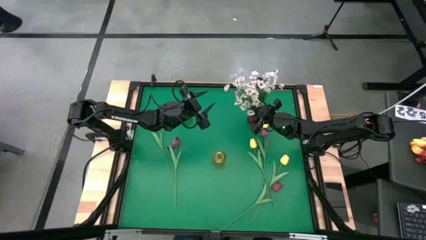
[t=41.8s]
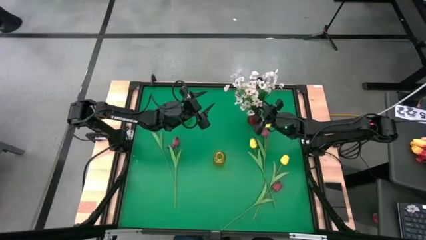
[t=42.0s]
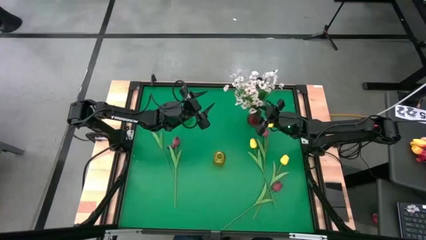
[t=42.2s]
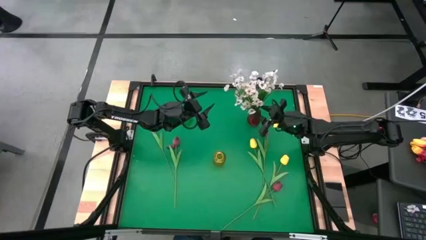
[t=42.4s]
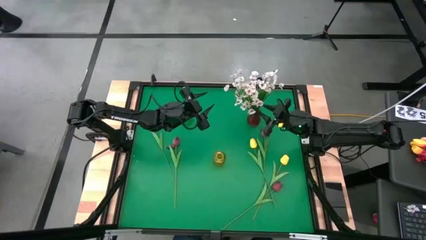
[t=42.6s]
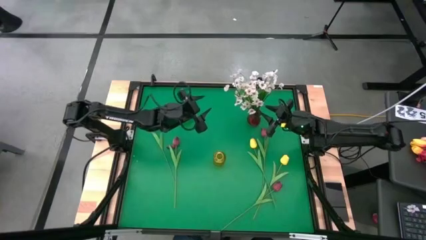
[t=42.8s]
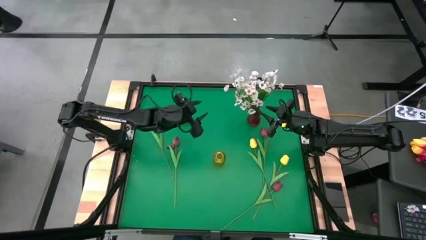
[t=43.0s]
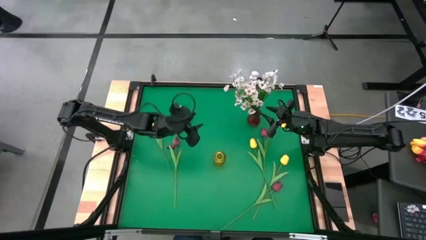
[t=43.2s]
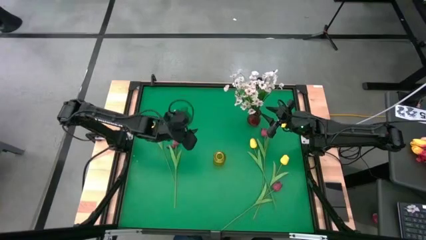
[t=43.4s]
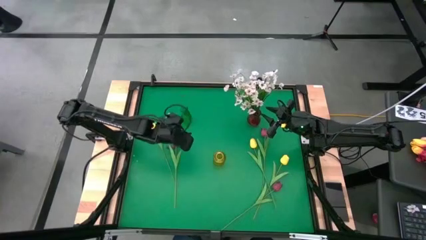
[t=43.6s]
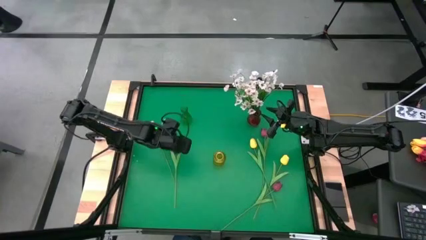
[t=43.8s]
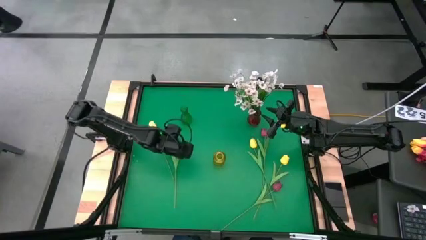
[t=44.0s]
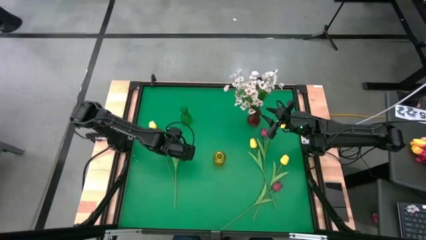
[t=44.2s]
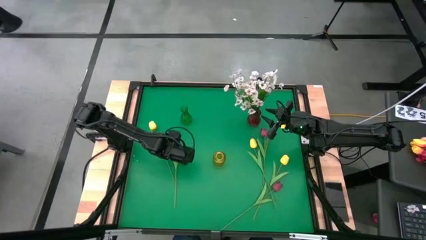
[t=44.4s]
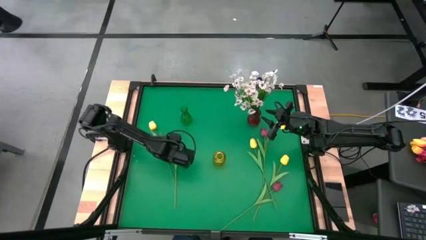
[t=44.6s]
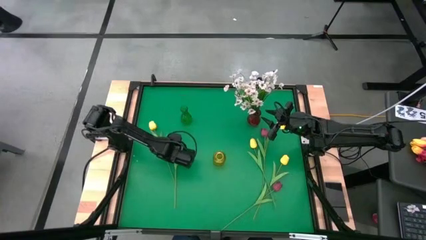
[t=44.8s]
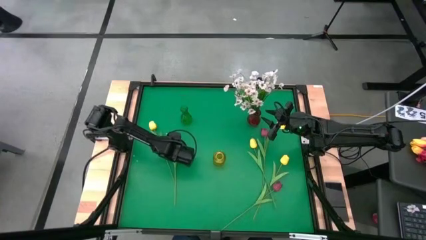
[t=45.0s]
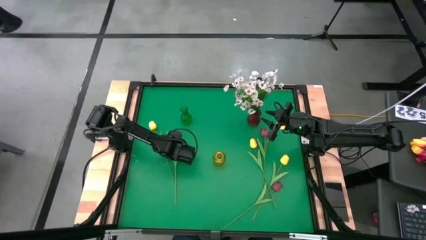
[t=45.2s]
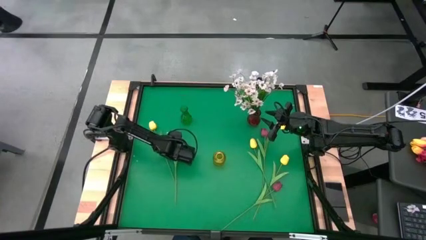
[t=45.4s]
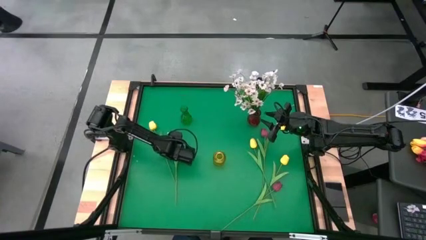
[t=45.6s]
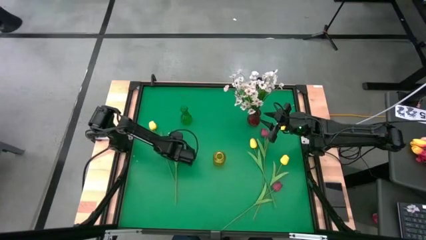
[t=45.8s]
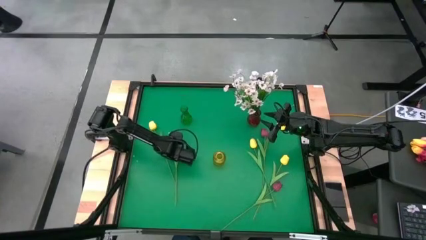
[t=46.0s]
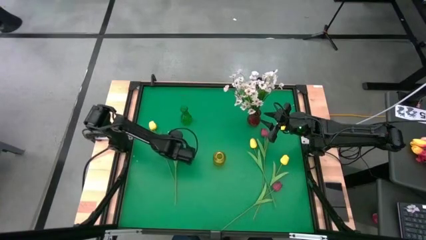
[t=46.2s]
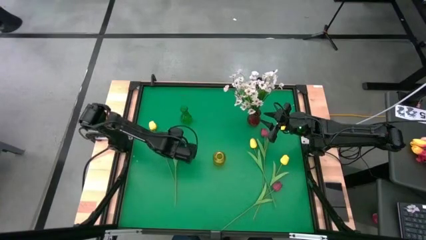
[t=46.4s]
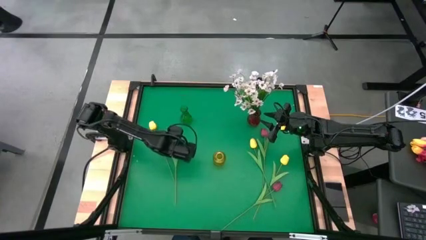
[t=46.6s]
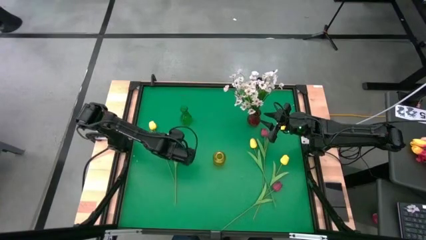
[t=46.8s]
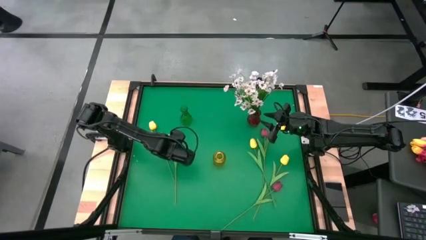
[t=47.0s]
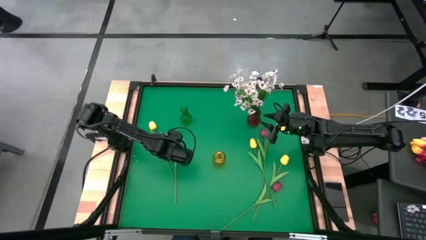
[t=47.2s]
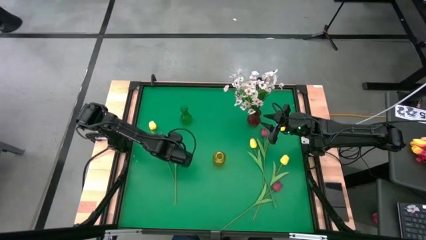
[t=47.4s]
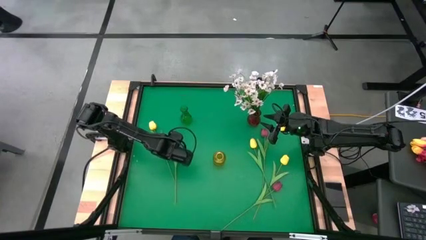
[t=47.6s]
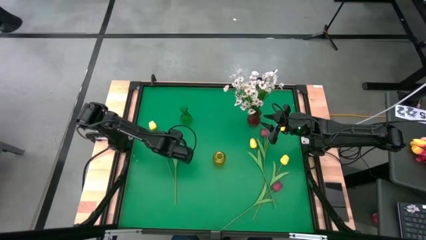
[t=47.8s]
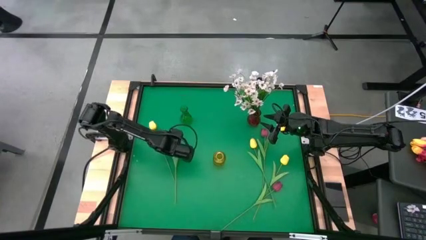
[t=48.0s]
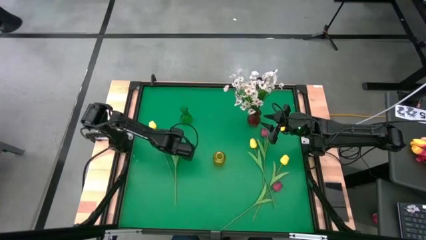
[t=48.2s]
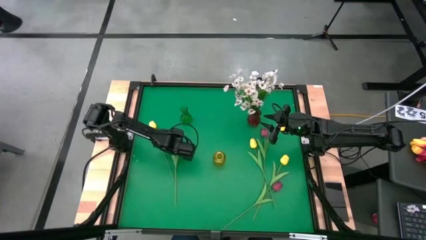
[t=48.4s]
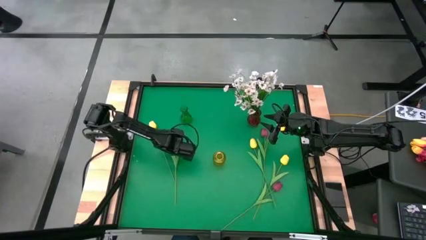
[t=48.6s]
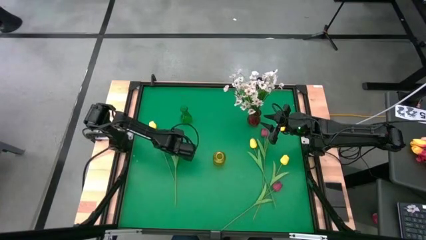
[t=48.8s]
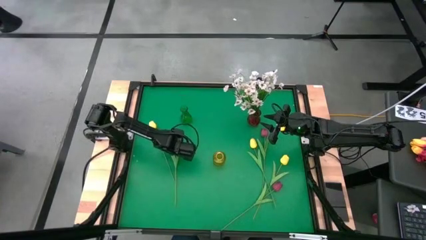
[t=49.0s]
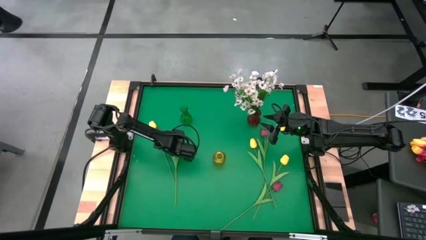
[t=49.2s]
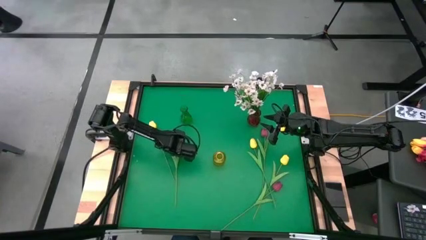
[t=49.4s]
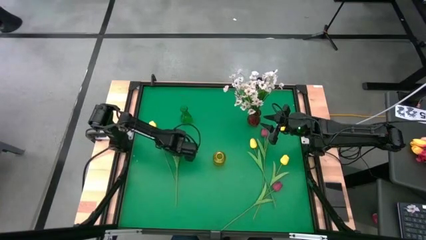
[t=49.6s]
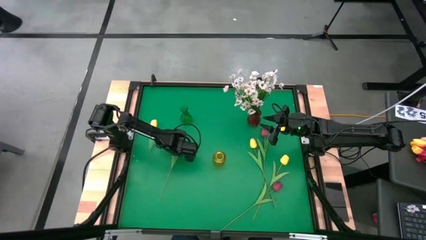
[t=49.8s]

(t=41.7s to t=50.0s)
Task: Sort flowers into vase by color
Put the left red flower into the green vase

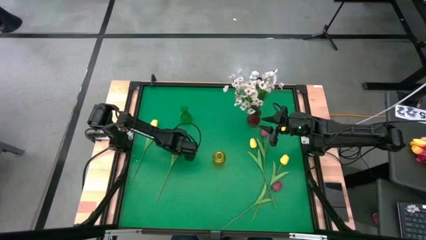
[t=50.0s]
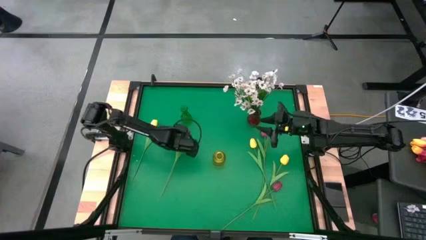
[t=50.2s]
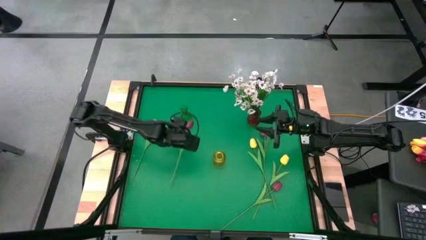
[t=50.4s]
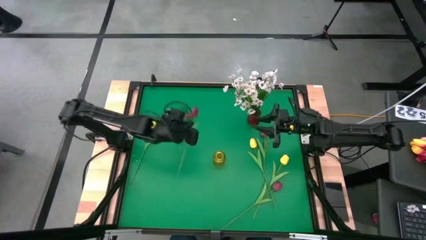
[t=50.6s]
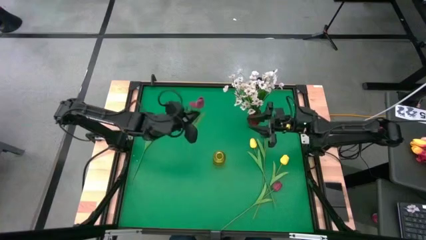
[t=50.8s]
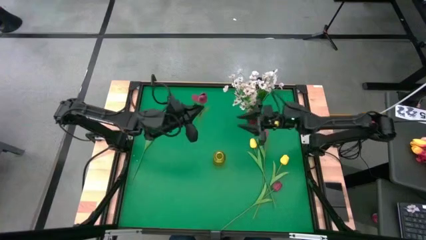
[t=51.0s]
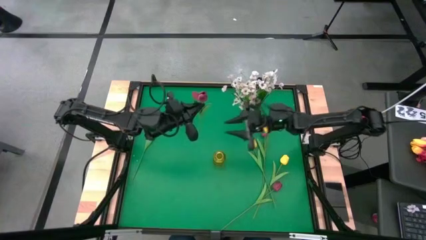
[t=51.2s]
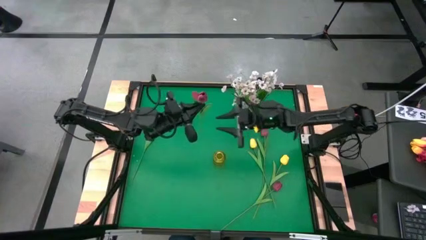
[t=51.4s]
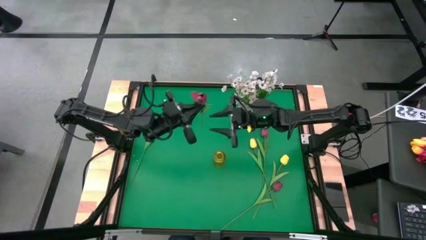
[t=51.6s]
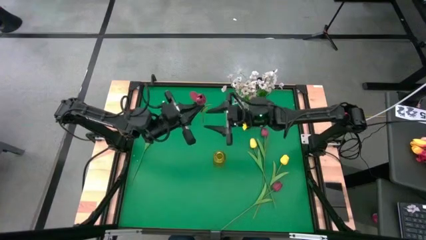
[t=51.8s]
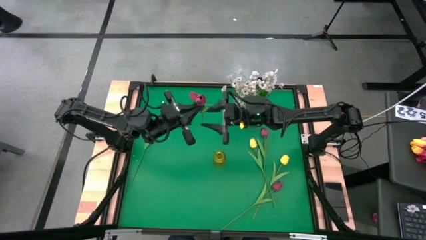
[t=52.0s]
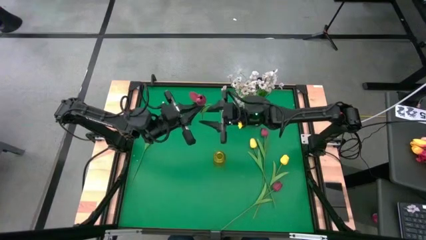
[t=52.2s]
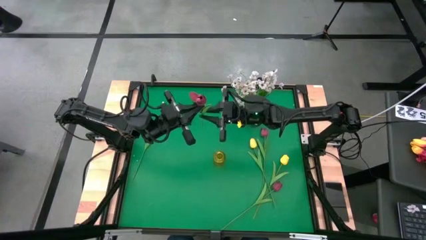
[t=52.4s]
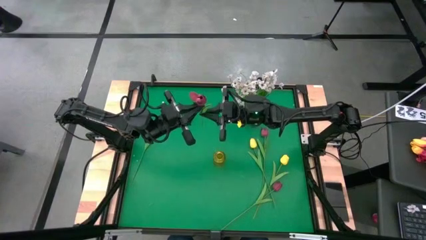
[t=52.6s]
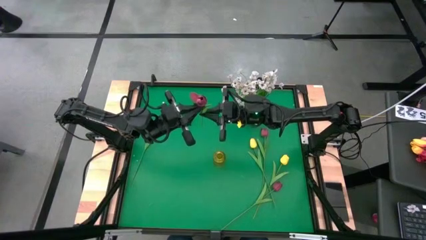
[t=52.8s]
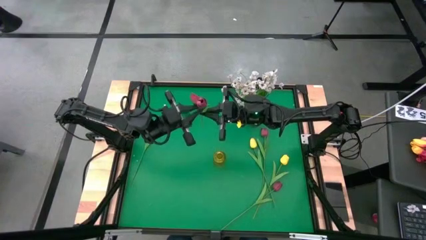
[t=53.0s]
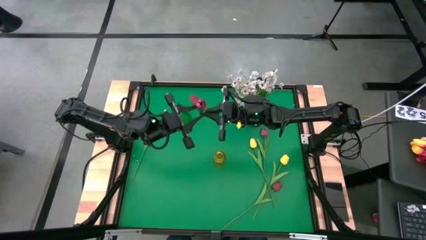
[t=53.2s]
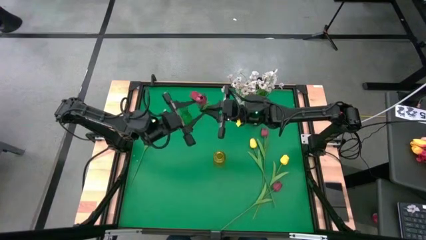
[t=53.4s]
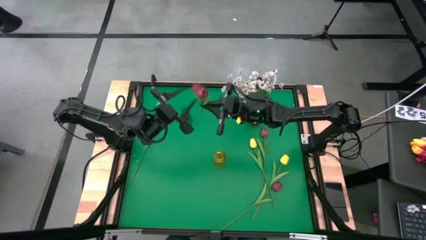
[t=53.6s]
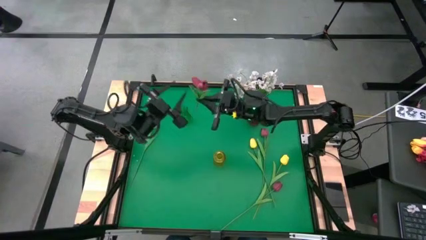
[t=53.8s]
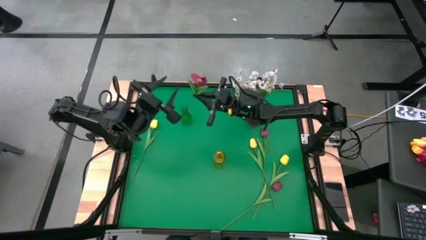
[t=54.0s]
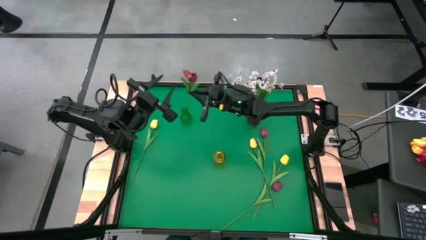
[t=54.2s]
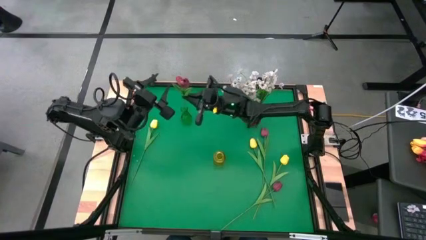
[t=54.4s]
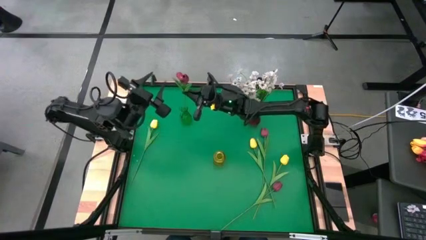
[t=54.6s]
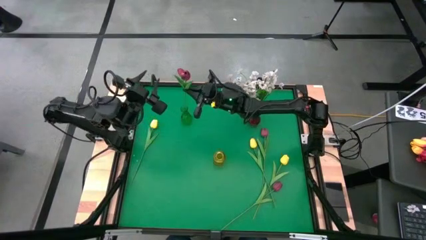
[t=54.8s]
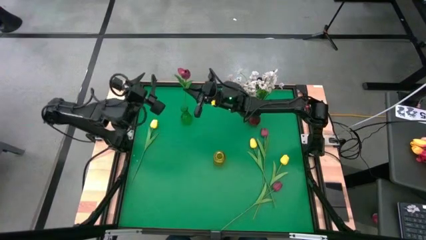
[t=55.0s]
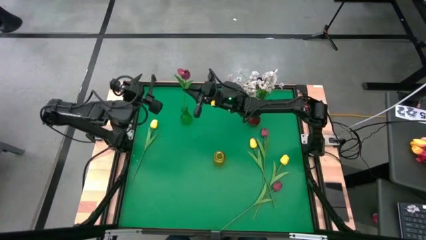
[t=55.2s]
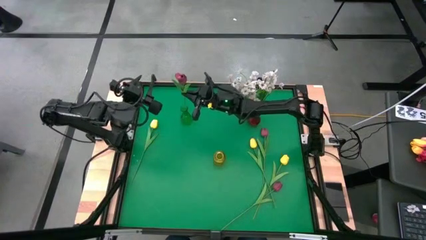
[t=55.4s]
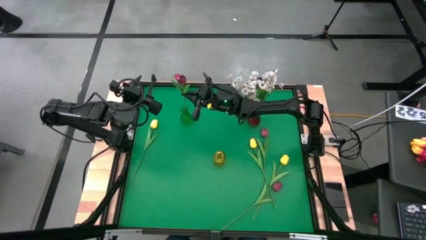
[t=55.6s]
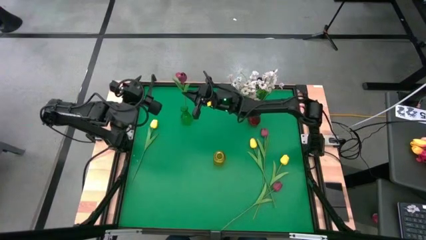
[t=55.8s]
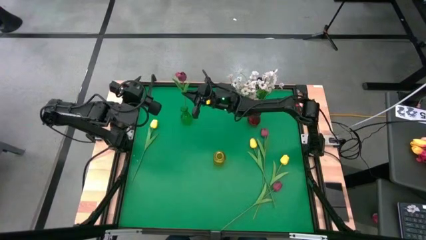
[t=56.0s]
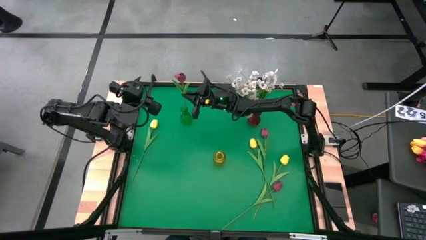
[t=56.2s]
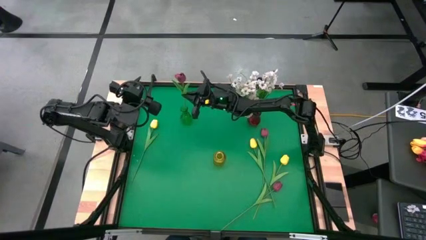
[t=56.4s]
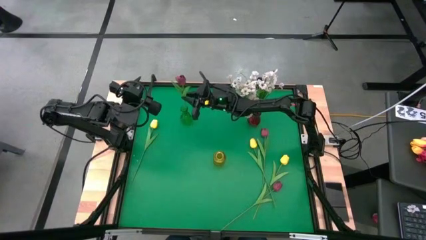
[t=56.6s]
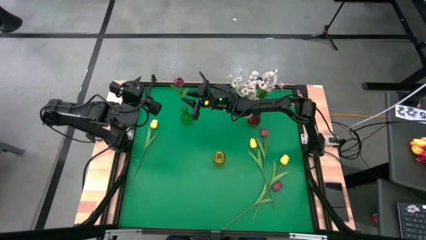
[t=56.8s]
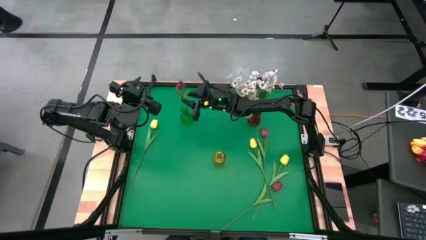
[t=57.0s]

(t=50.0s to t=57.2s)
Put the left red flower into the green vase
